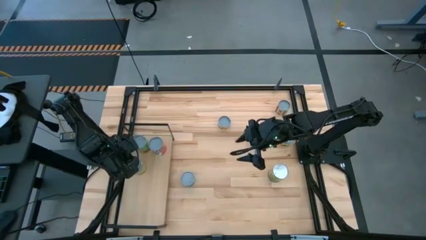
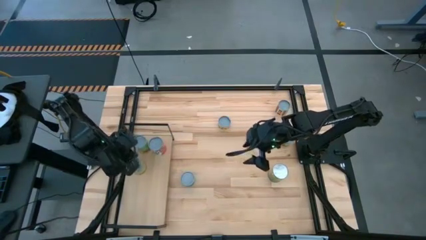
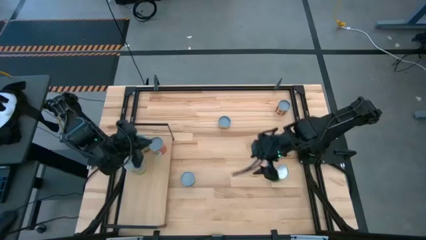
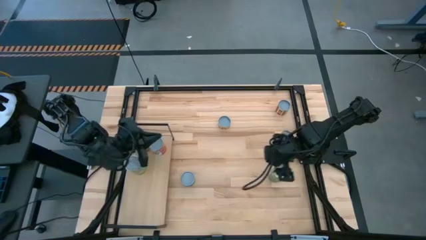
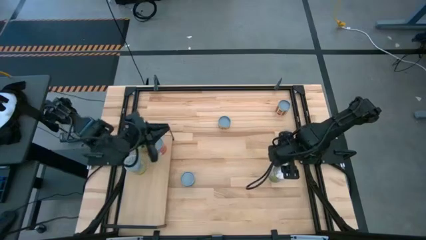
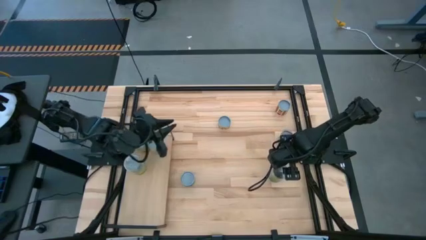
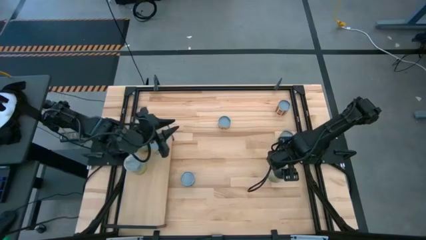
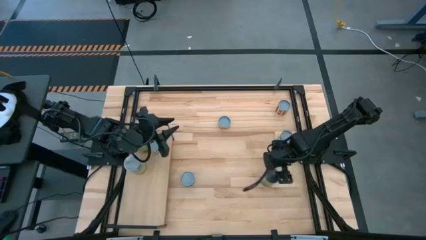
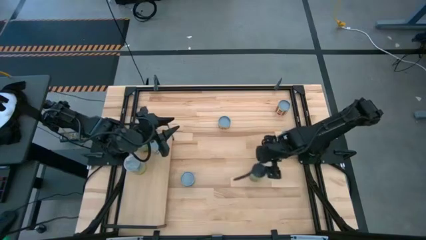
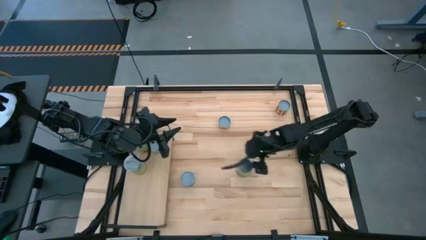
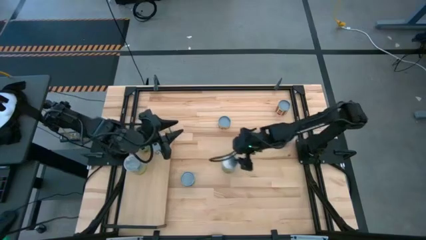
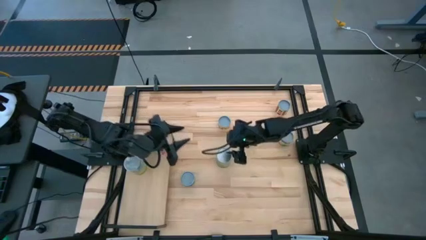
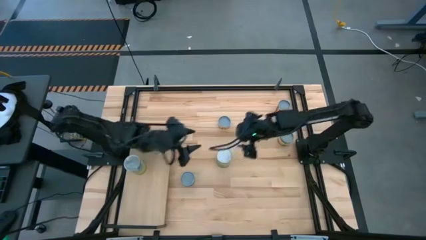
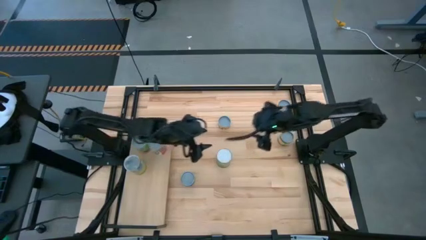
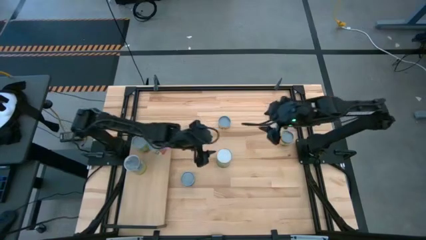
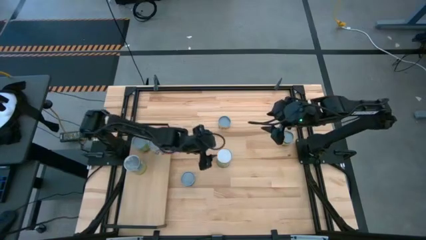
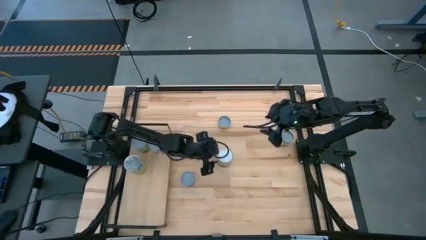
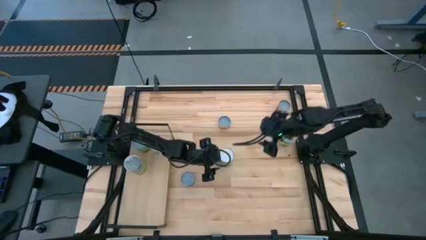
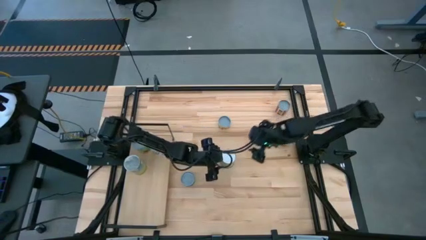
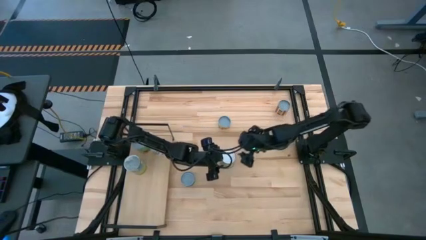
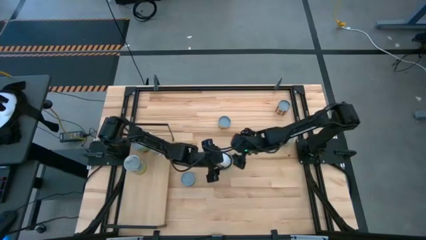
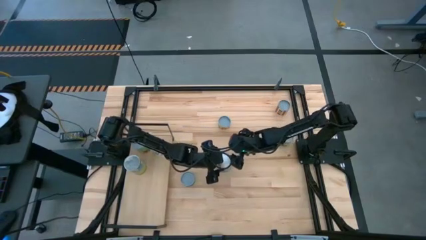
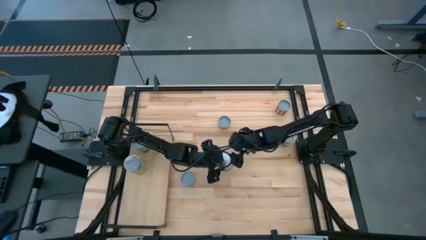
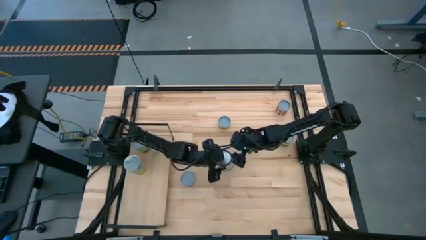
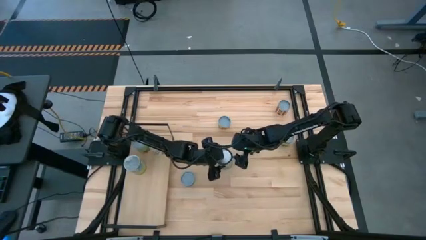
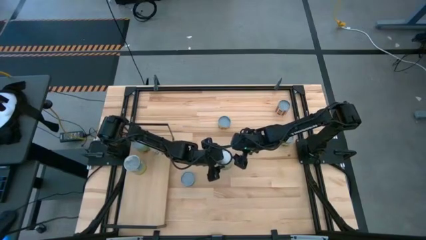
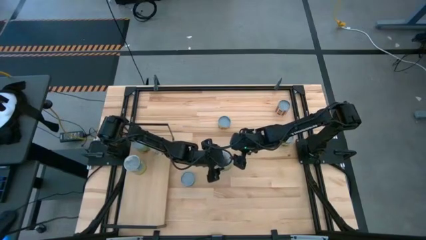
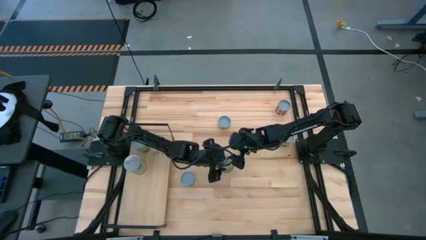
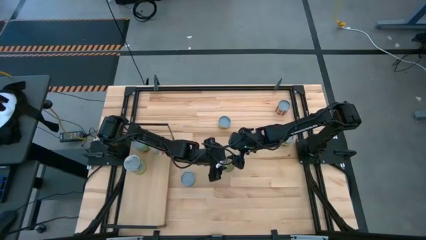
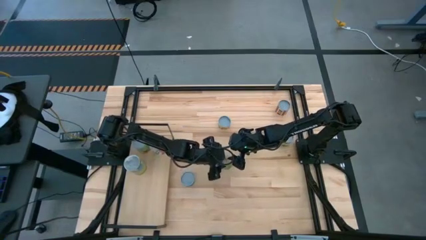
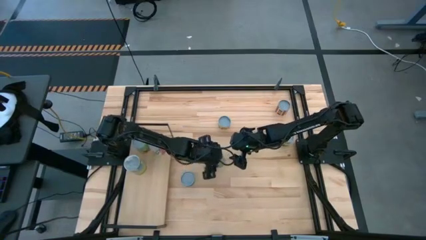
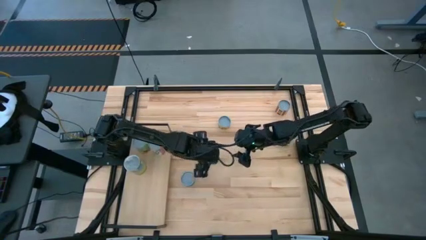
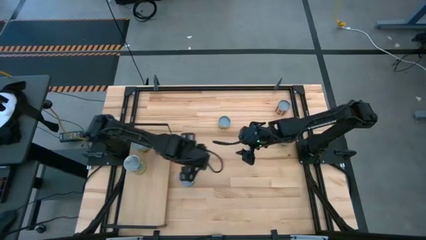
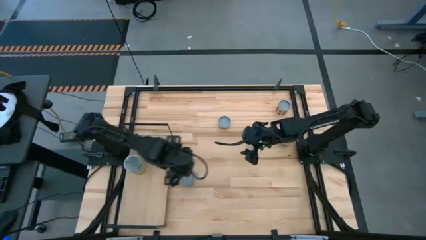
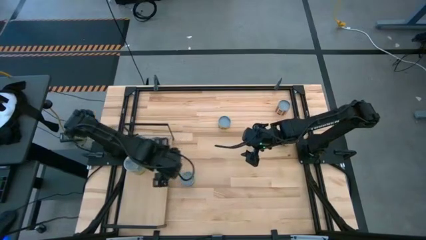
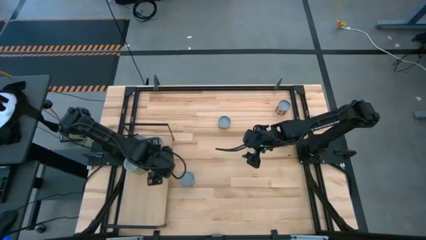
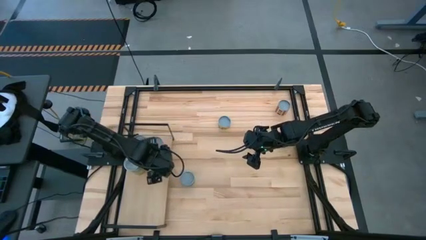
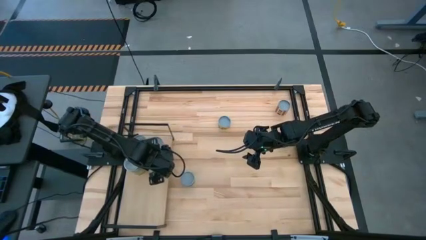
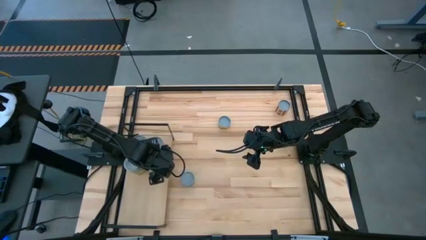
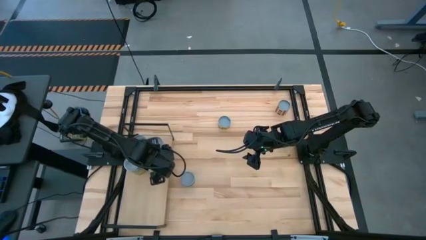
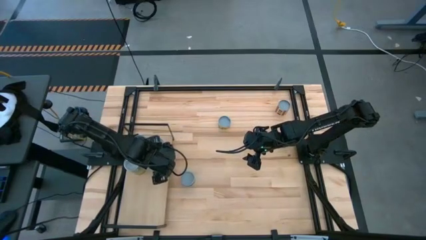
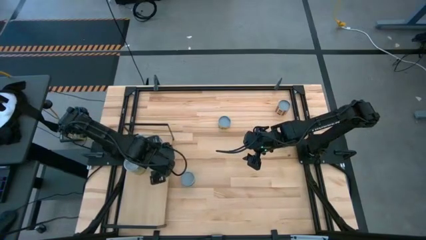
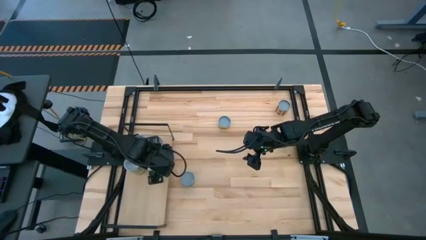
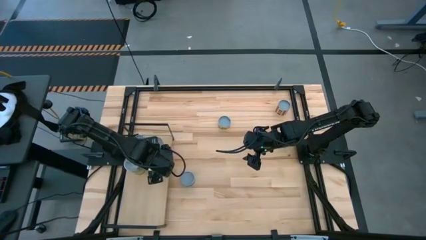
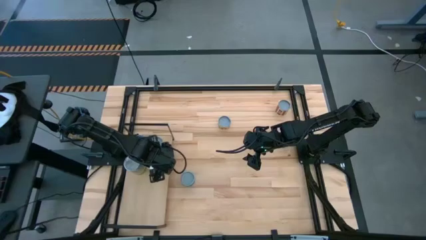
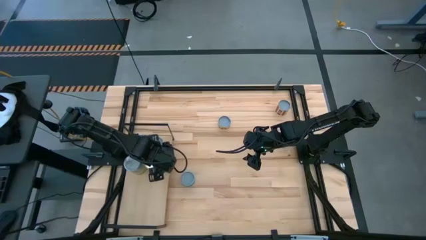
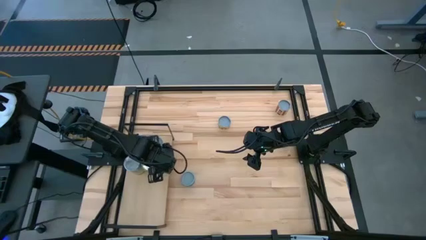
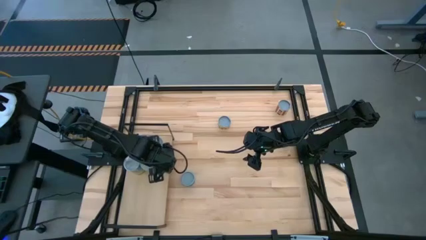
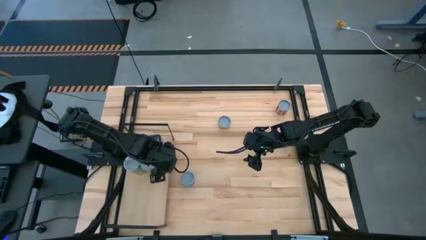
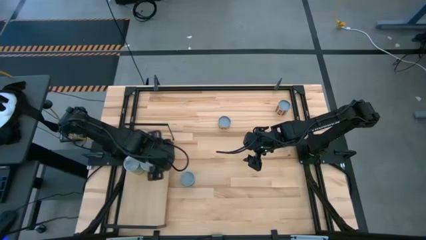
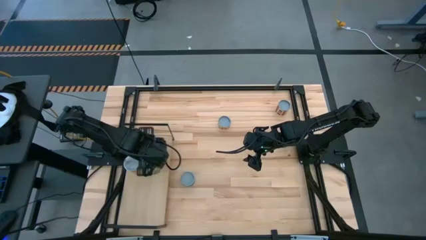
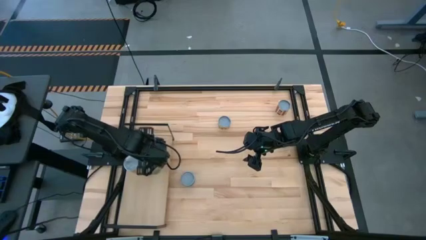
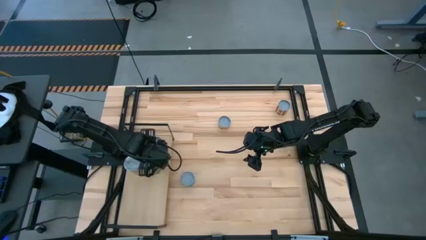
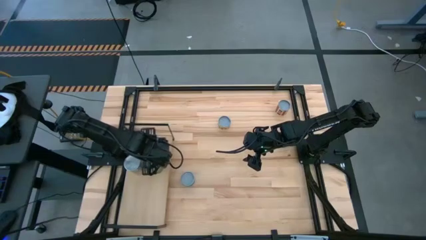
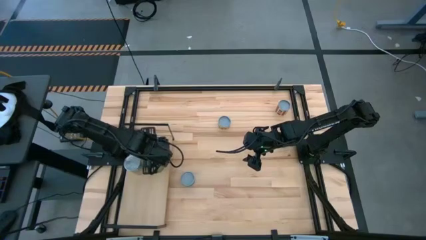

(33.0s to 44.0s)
Task: Pick and place cans onto a shelf
Put the canned oranges on the shelf

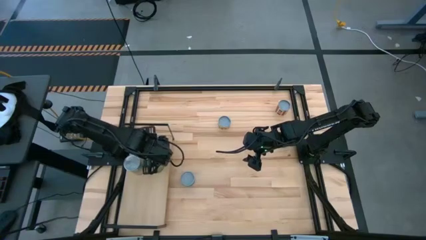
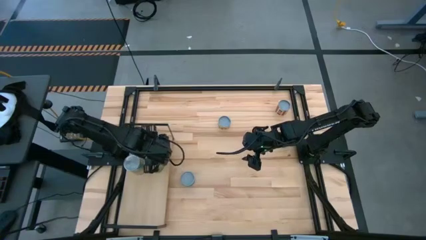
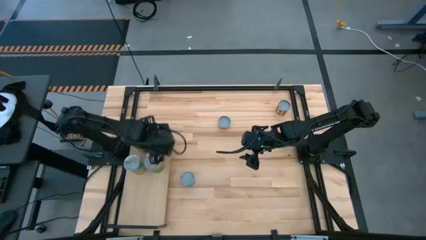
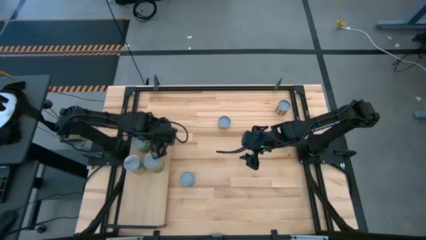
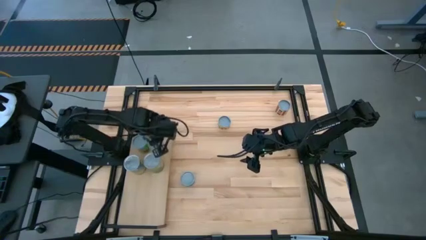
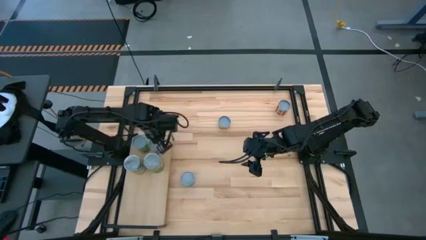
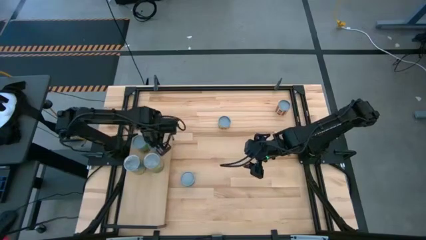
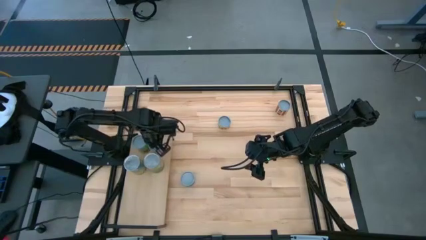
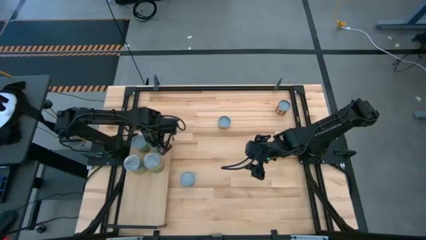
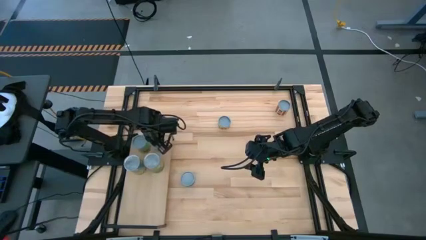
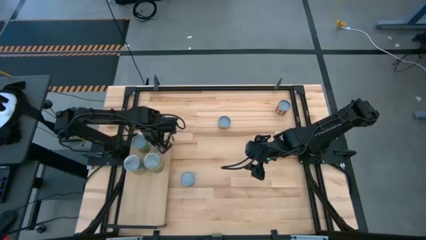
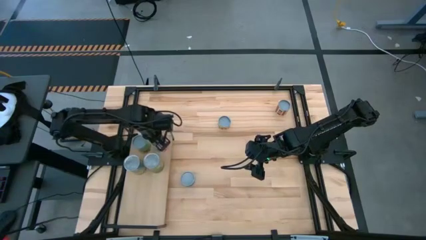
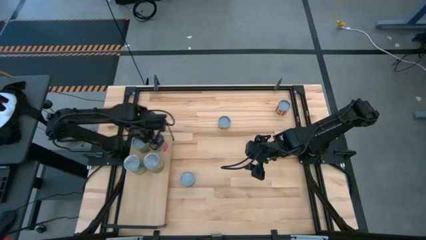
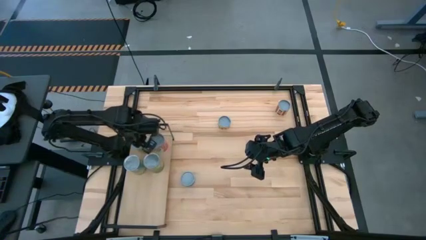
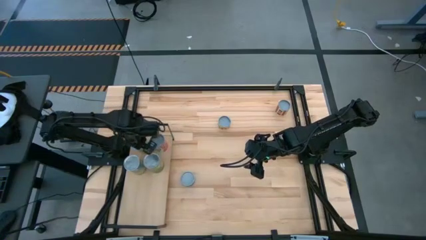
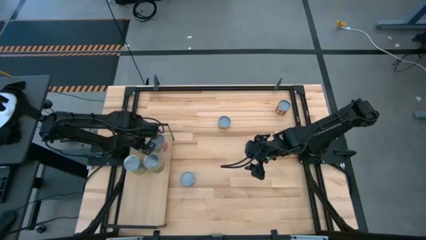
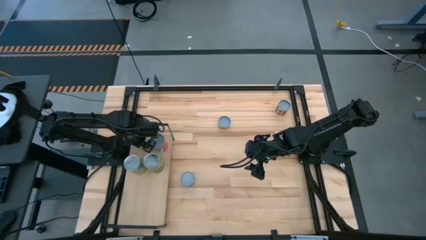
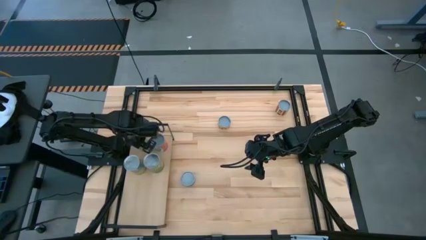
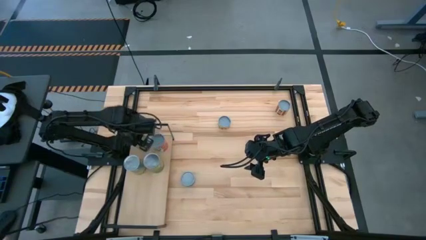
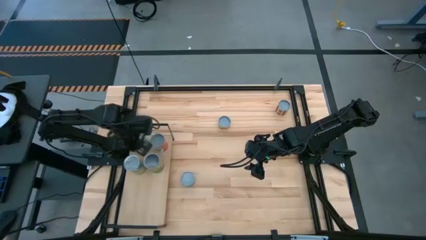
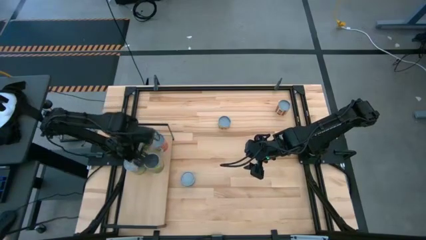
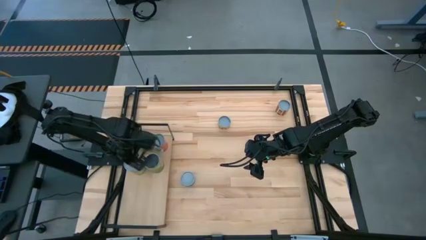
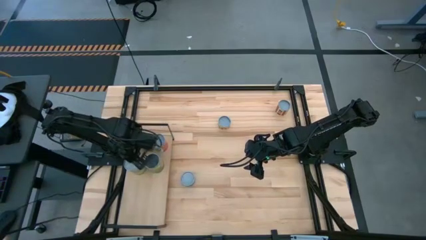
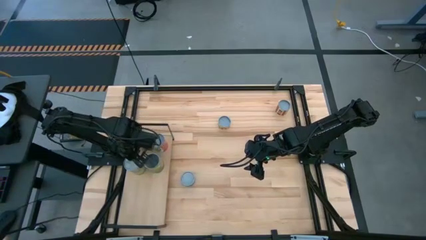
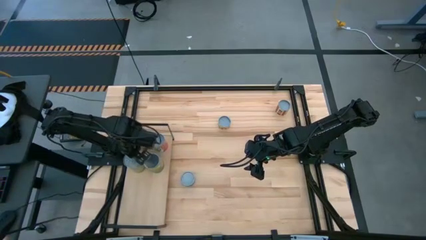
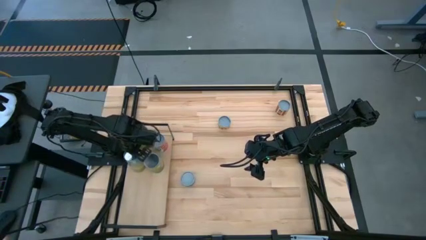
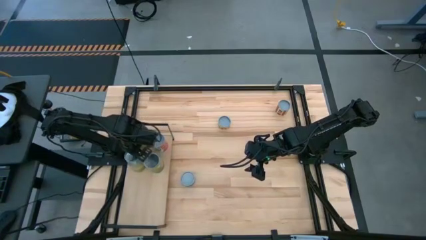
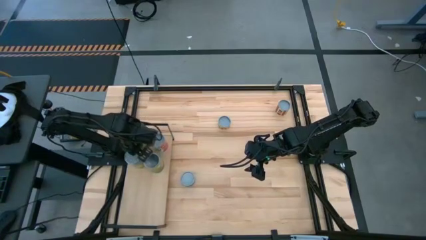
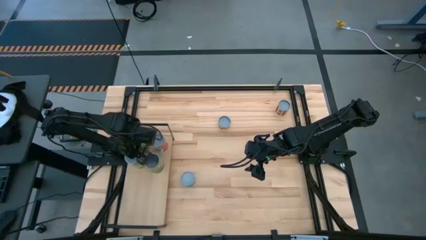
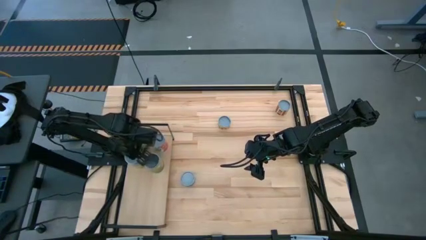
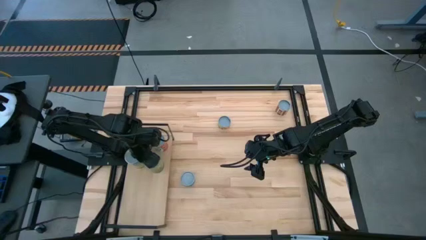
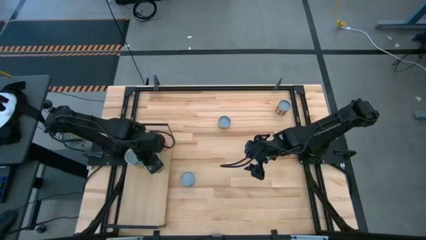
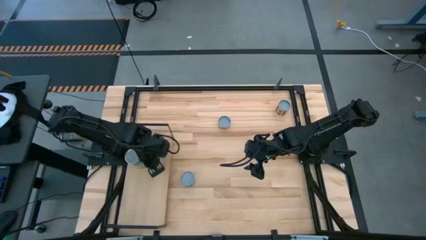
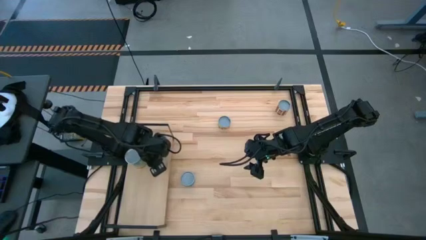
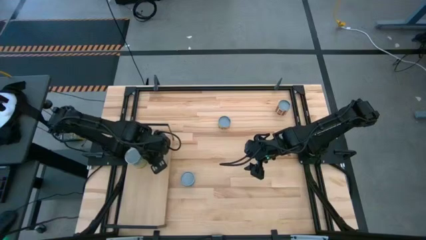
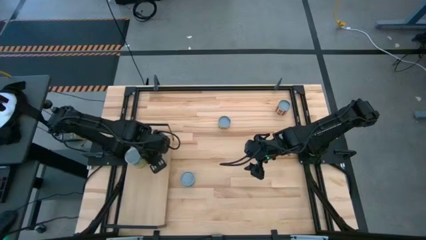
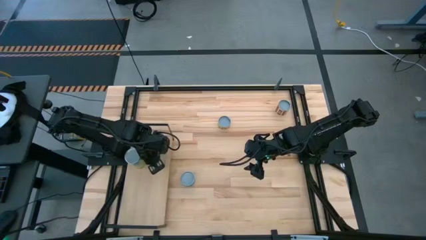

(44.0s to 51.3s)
Adjust the cans on the shelf
